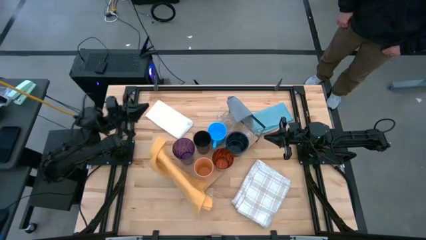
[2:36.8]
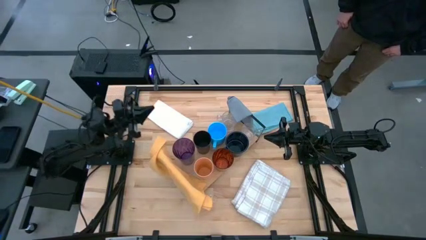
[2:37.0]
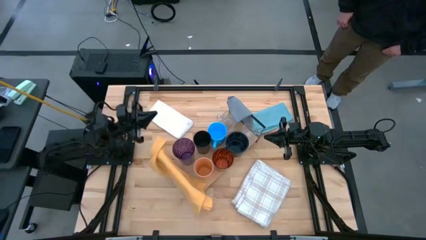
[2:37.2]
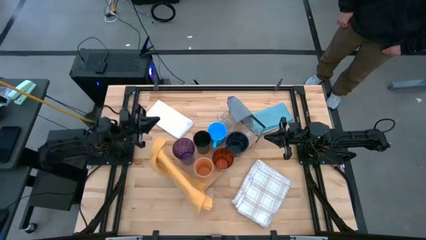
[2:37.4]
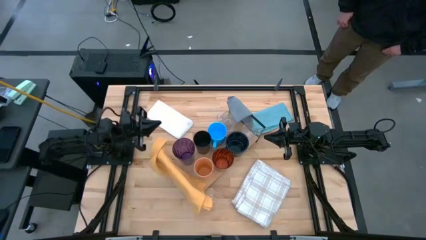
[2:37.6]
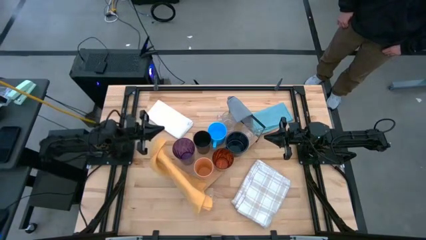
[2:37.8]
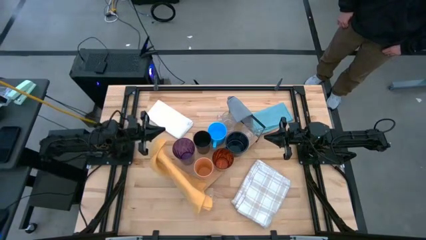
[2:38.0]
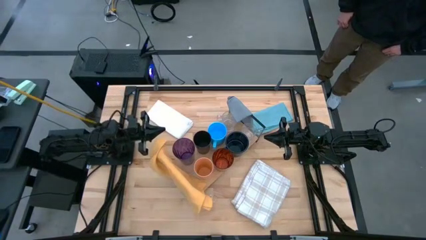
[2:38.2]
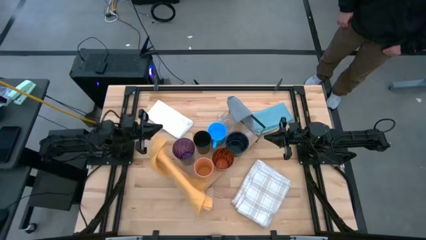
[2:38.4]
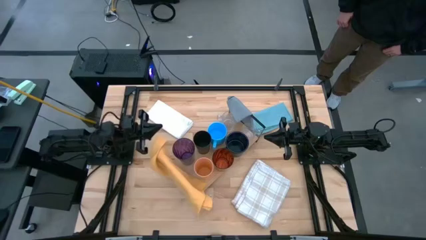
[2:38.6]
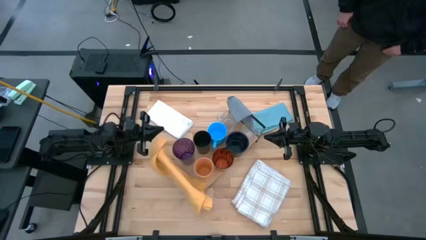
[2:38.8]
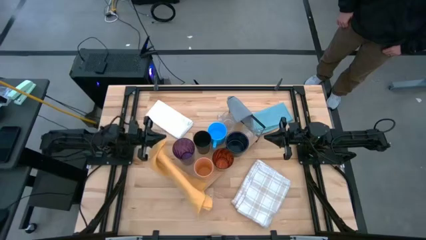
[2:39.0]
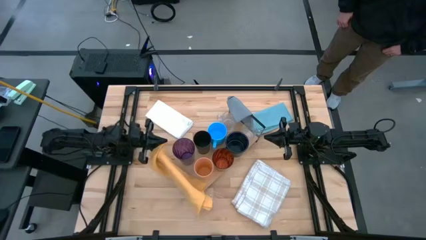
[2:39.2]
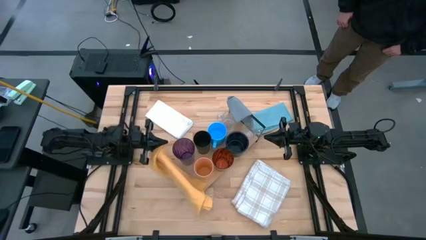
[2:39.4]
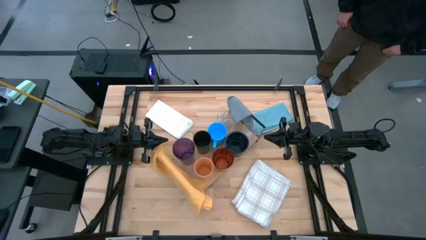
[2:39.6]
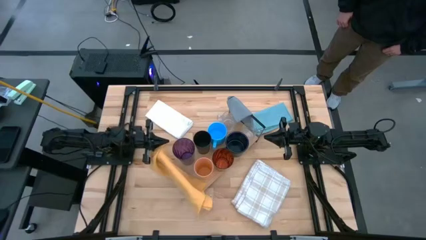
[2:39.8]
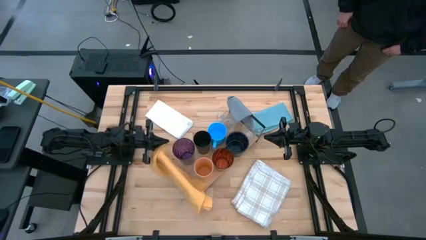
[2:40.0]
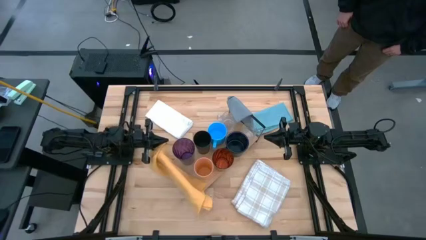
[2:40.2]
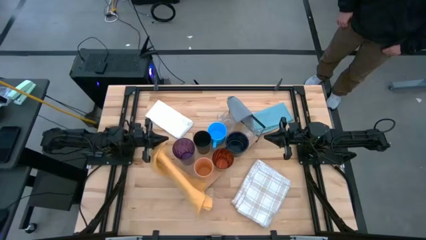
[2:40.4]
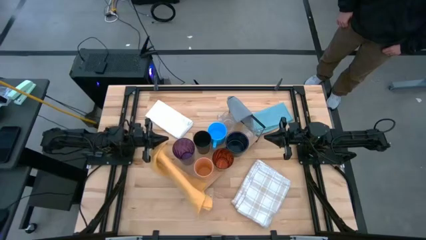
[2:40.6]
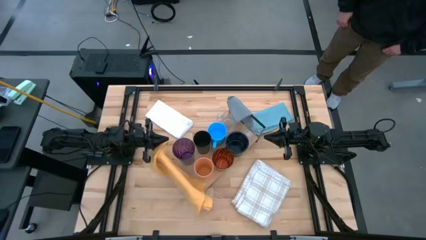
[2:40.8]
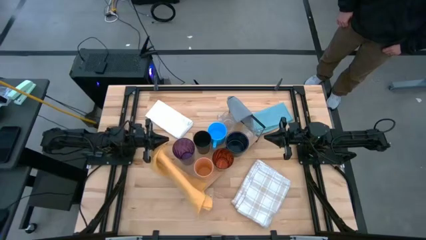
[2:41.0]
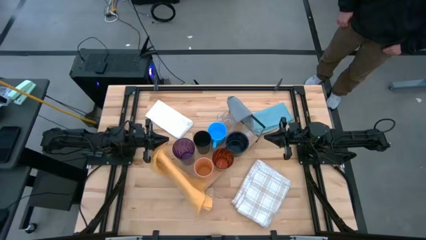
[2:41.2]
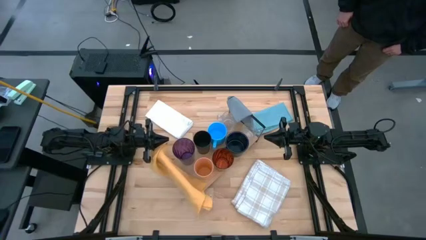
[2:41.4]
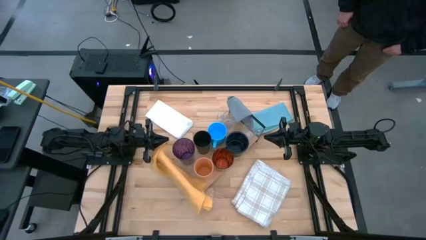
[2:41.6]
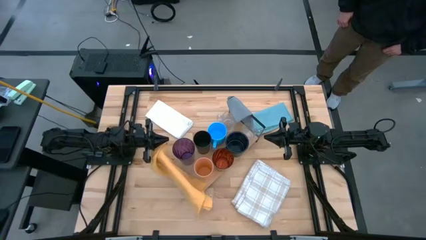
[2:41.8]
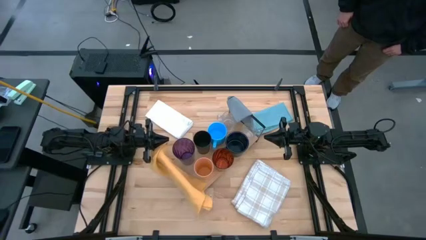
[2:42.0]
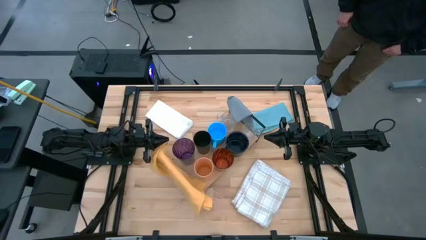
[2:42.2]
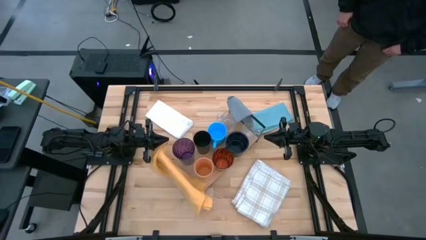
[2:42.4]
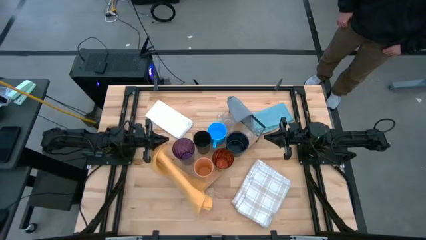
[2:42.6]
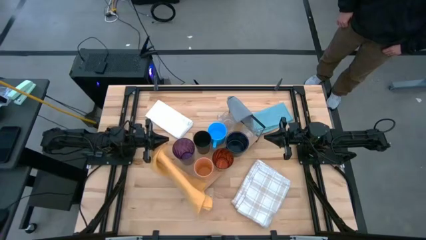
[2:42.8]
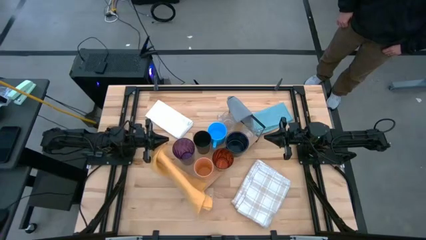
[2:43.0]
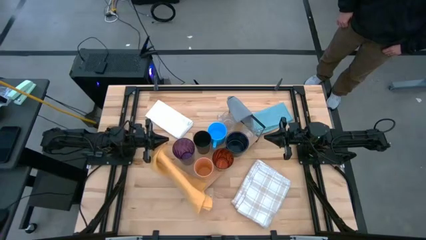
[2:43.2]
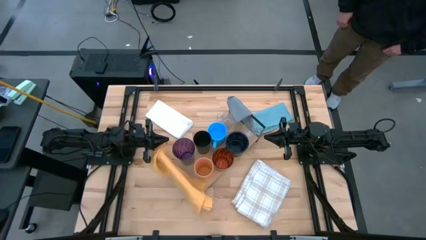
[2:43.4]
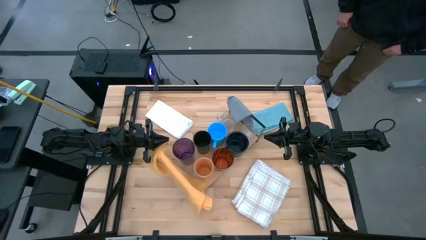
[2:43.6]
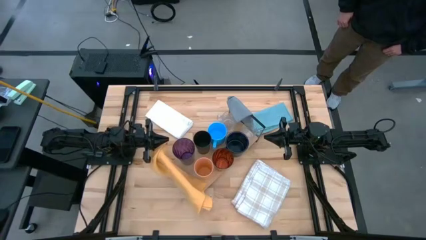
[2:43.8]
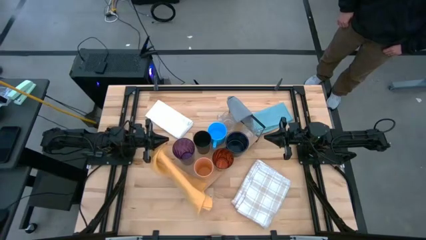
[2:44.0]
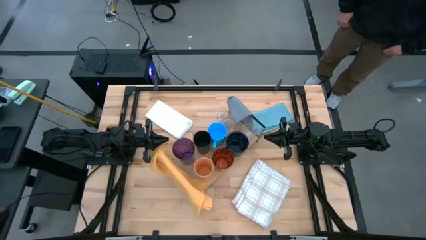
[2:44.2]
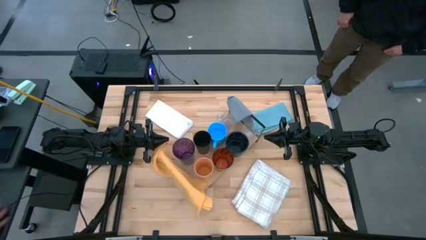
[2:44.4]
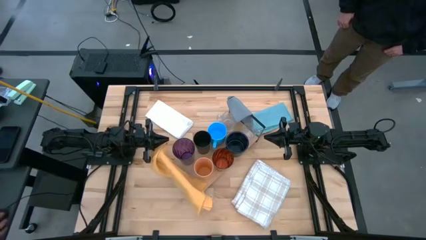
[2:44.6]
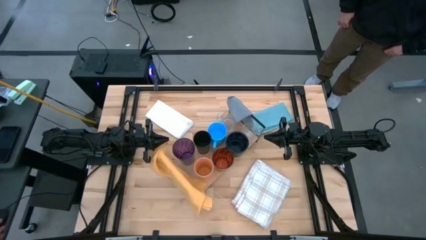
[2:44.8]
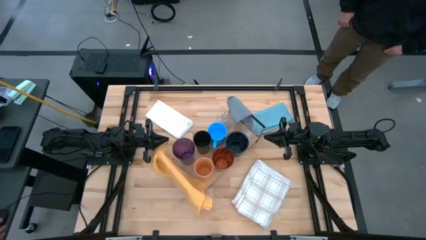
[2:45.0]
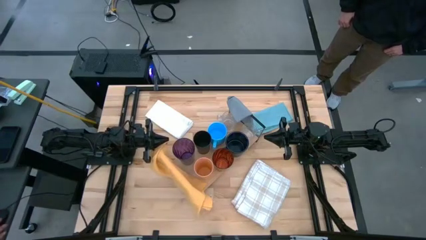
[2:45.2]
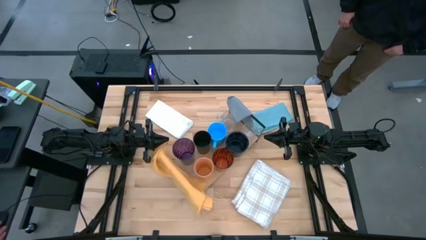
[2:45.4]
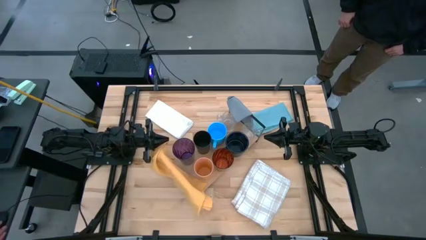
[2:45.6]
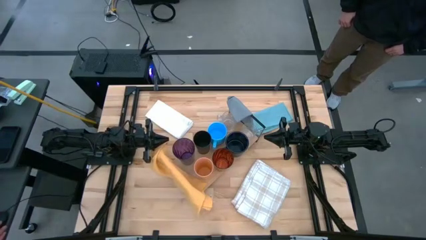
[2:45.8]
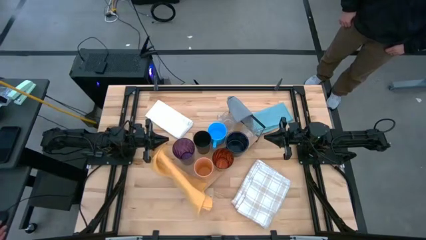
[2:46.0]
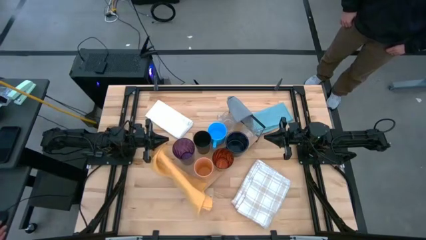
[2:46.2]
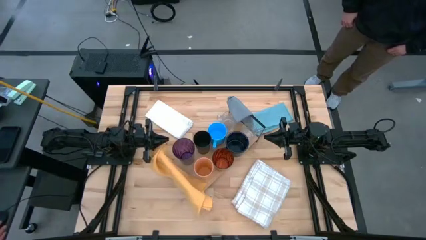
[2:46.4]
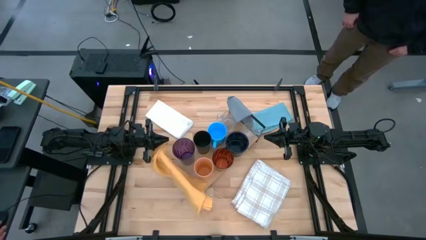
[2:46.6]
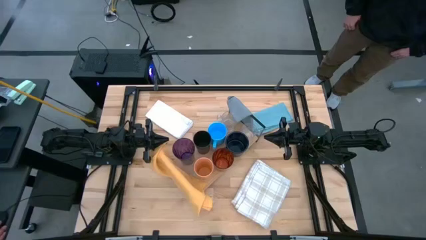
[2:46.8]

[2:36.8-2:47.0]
Task: Stack small to large cups/mugs on shelf
Return to Home Position
